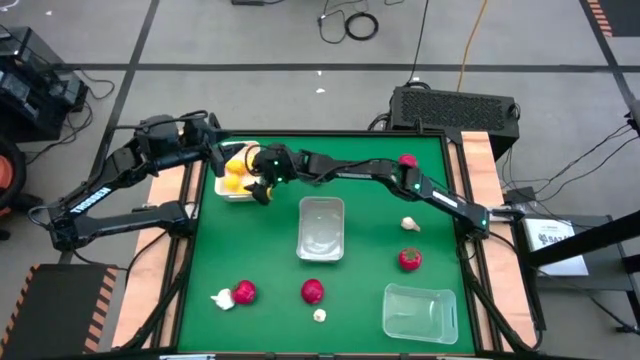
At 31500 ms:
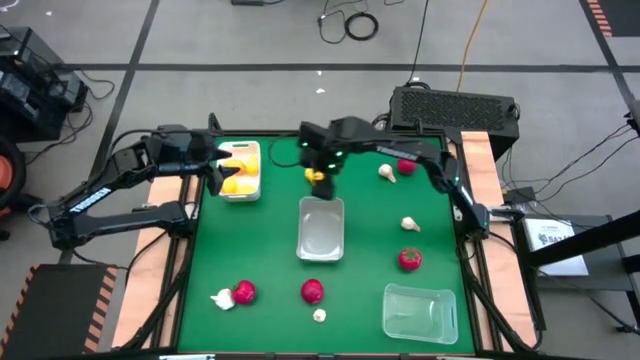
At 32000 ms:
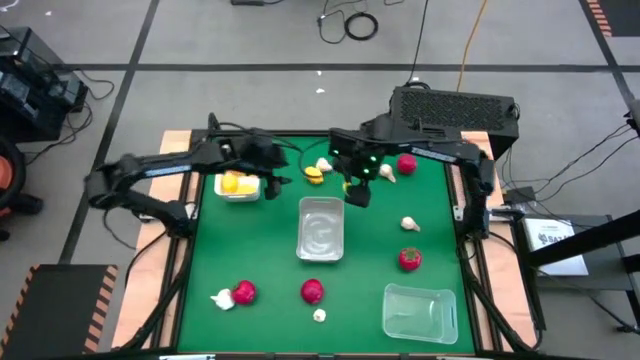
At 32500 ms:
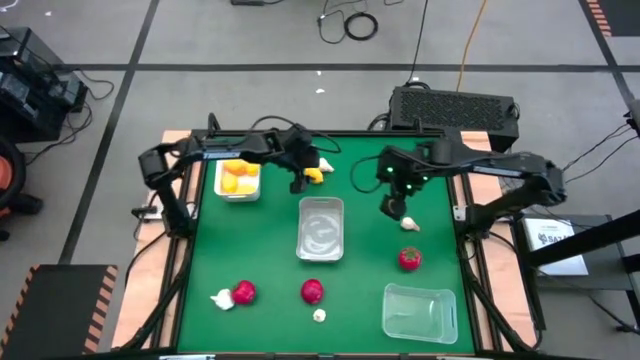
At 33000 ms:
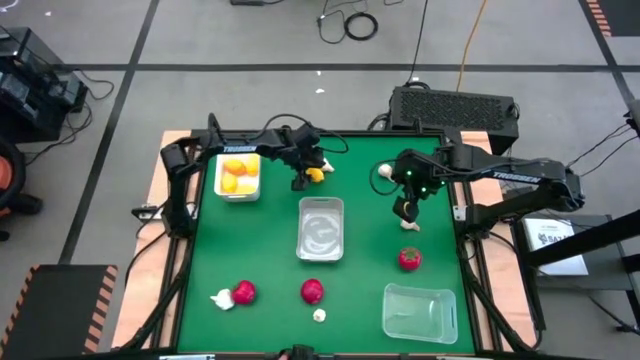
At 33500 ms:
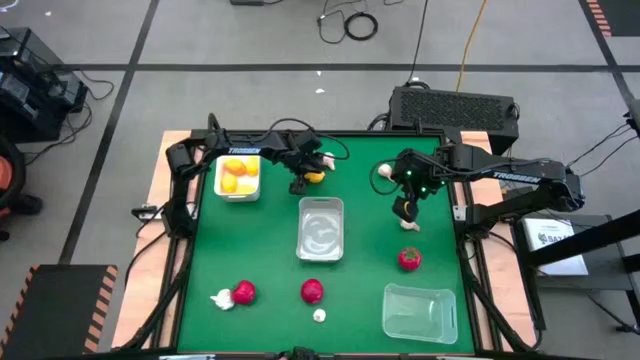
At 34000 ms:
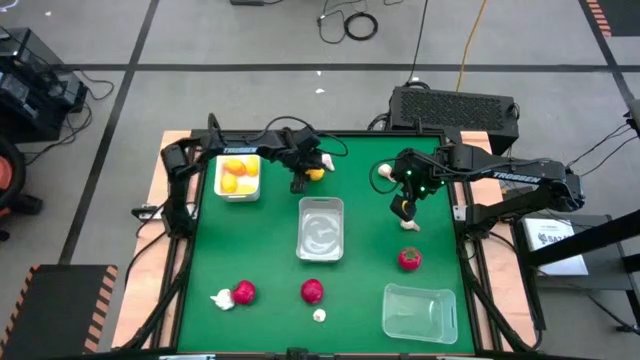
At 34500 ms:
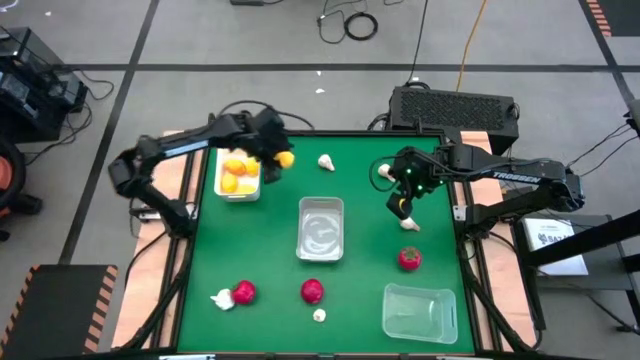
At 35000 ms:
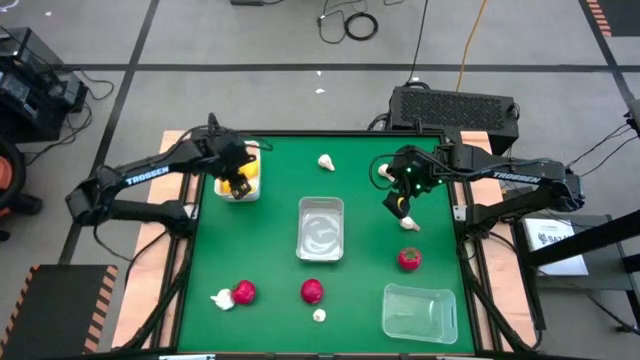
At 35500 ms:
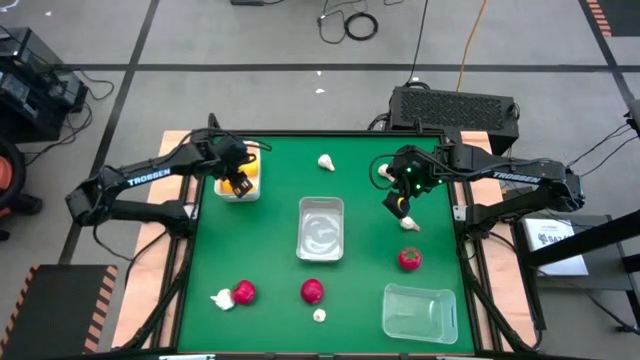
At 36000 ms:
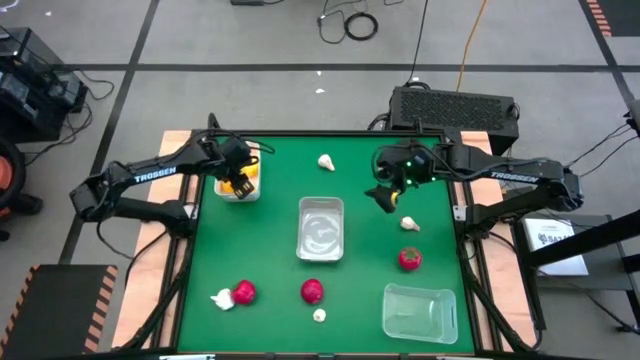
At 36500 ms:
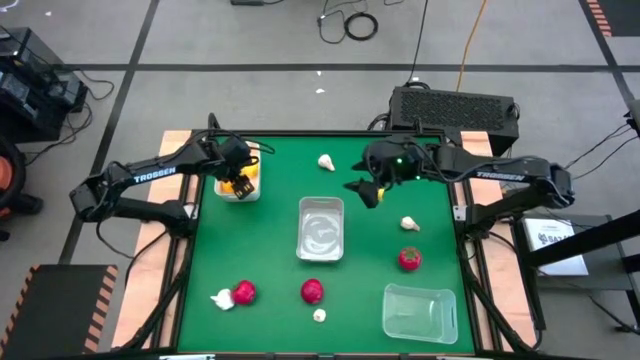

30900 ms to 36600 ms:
Task: Sort produce into baskets
Put the lemon into the white bin

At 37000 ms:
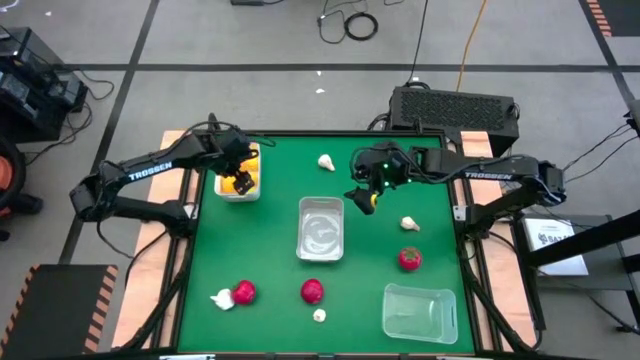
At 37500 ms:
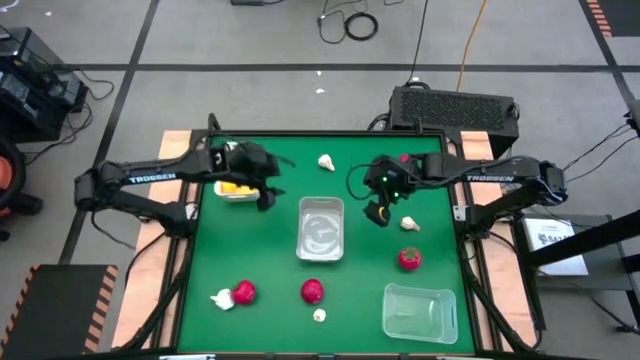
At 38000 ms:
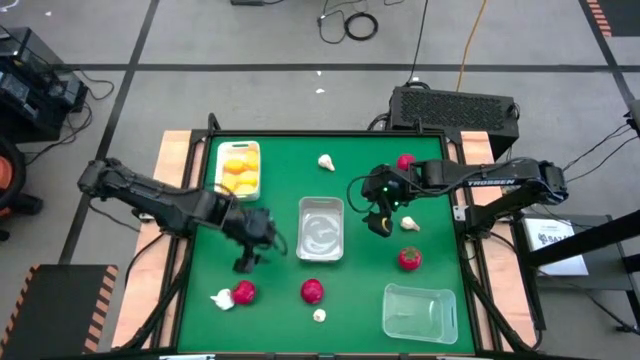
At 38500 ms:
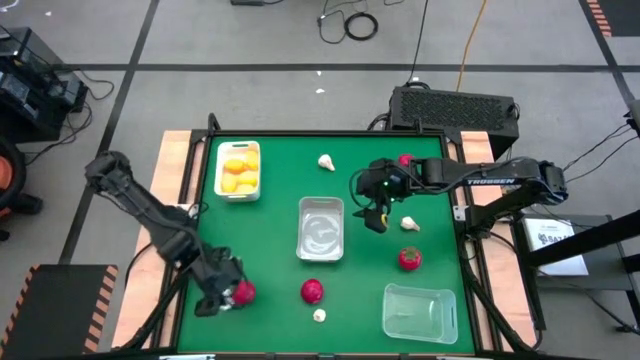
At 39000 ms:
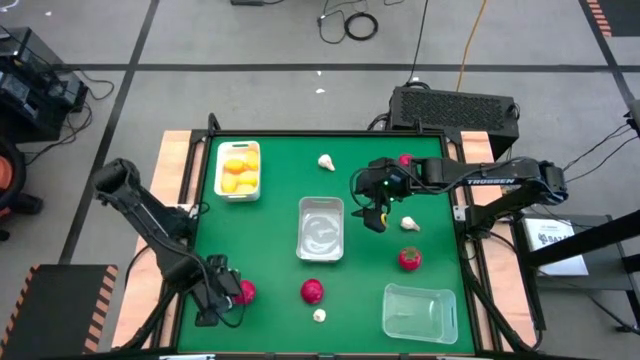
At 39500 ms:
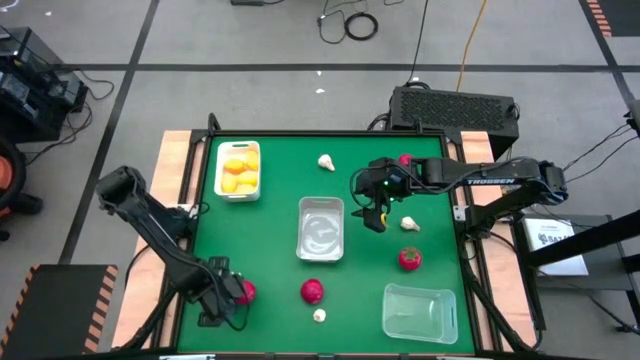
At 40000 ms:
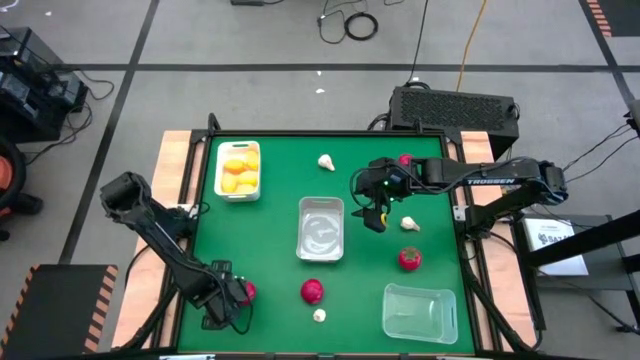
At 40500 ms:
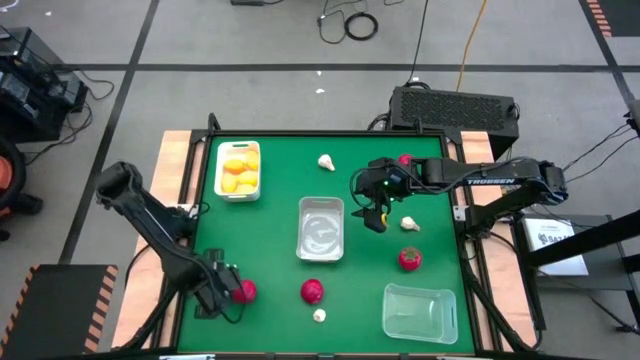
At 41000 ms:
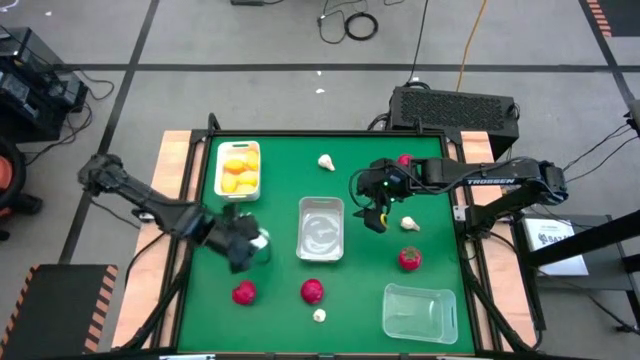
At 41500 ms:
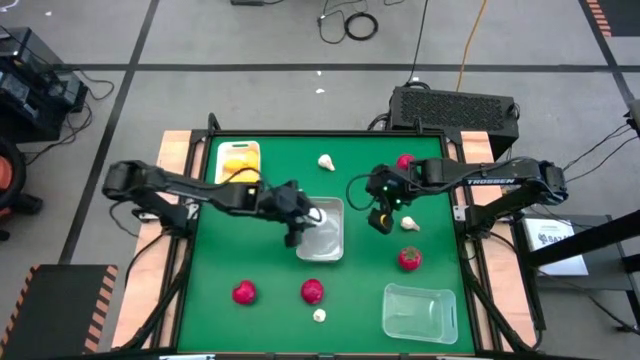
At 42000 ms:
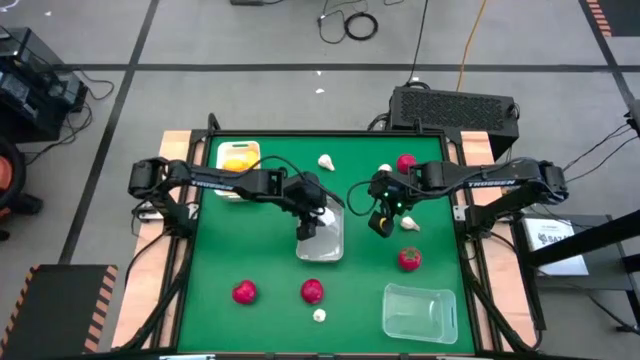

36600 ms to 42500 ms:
Put the garlic into the gray bin

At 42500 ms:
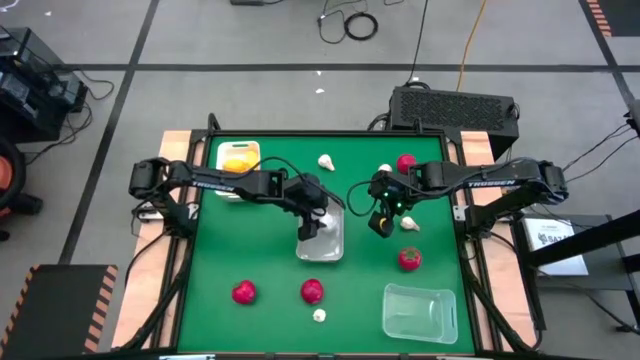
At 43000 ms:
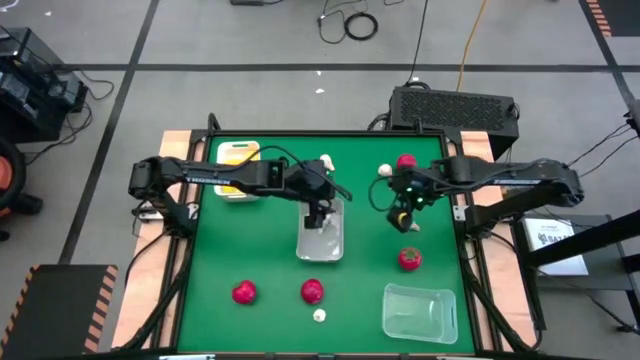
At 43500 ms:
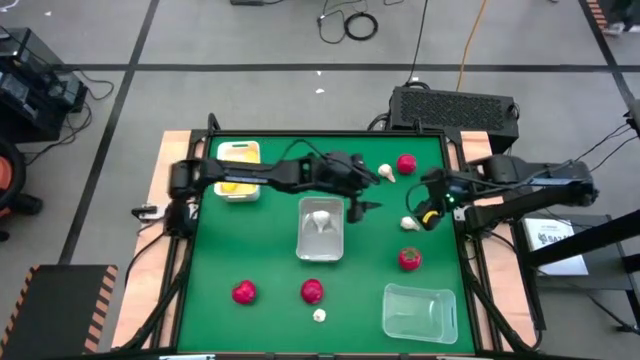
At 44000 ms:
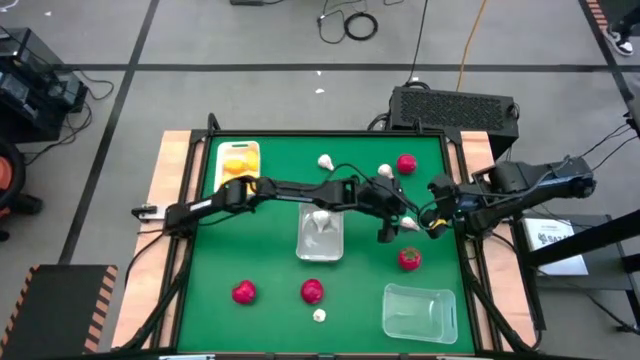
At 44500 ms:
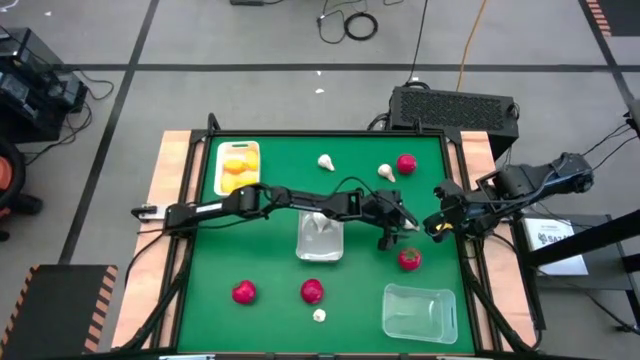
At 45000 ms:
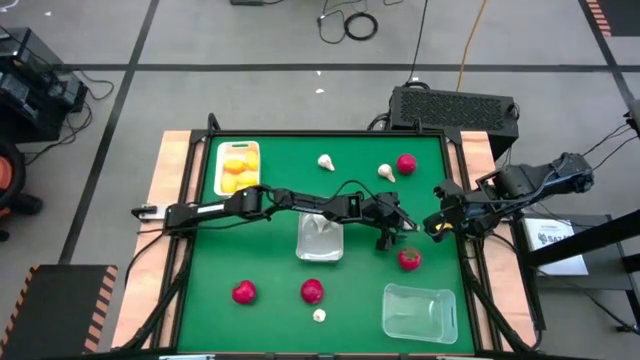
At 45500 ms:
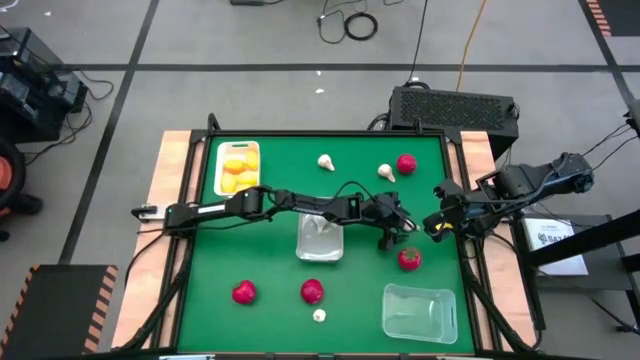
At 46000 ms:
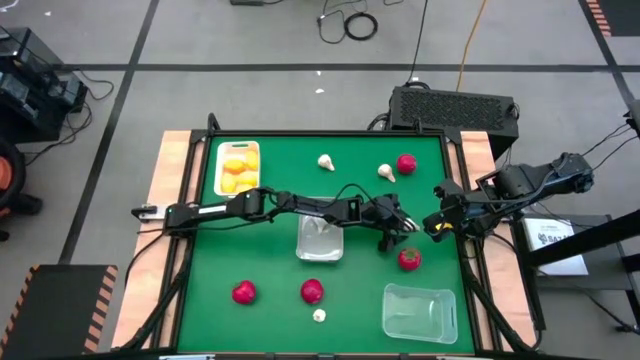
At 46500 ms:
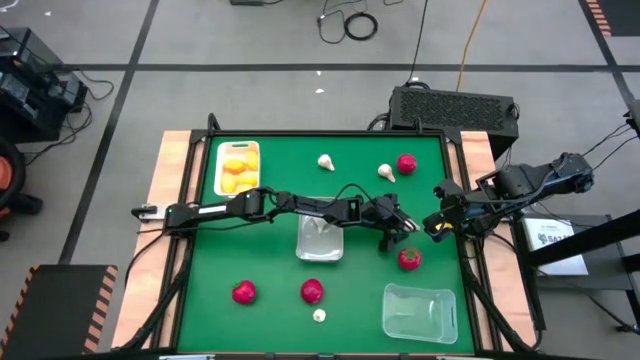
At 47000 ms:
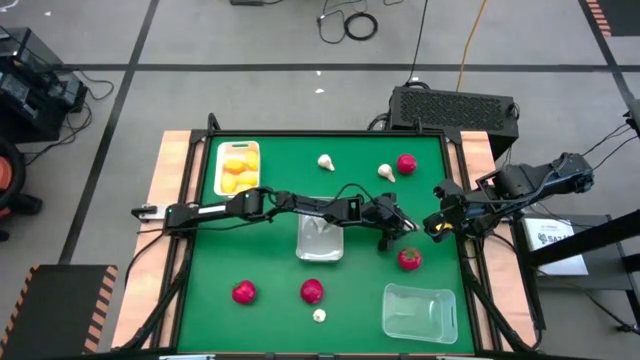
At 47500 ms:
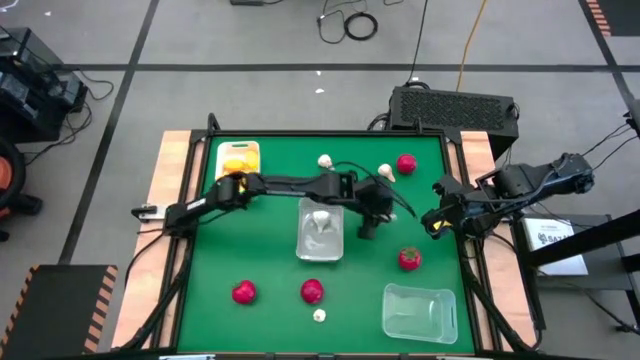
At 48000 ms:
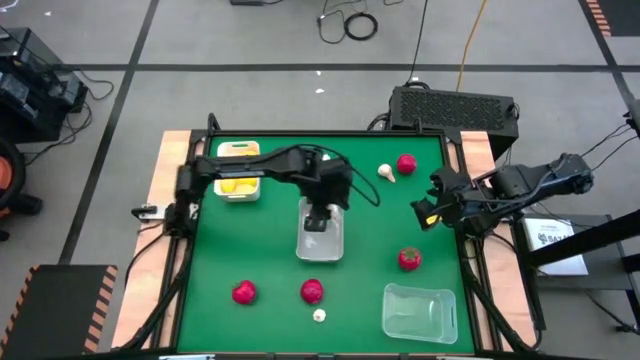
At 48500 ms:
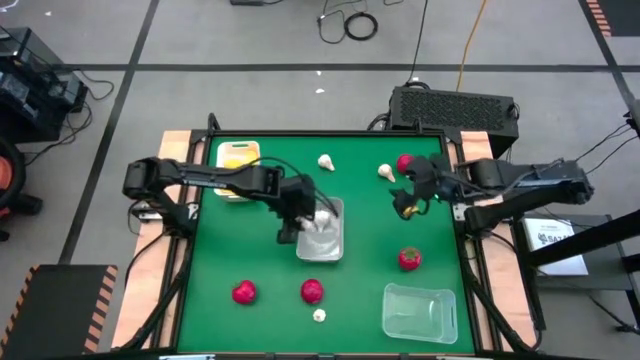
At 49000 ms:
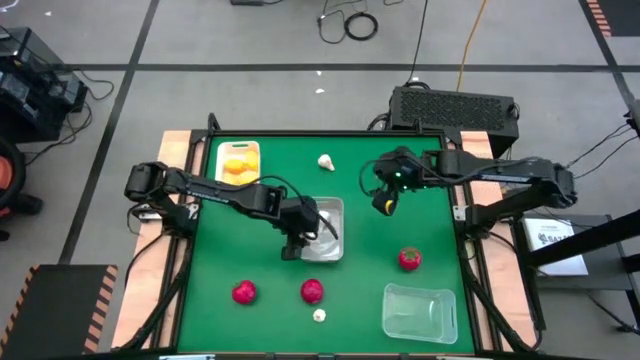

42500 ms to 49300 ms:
Put the garlic into the gray bin

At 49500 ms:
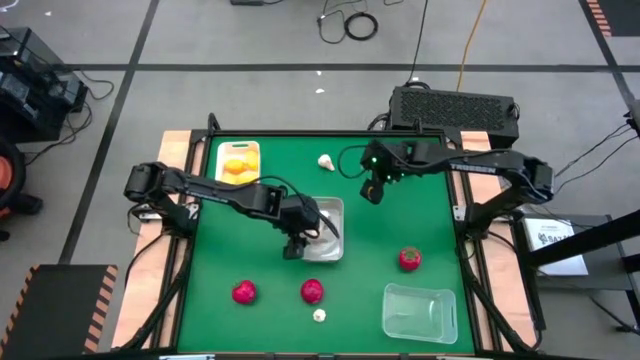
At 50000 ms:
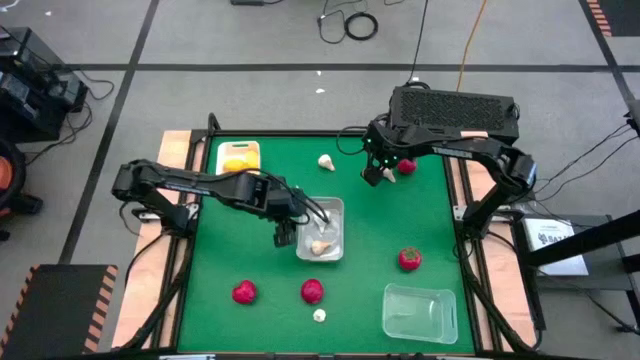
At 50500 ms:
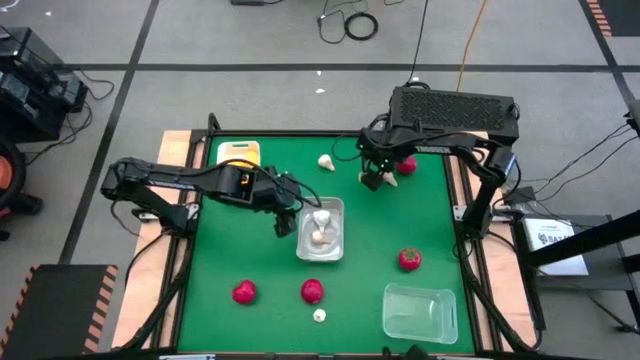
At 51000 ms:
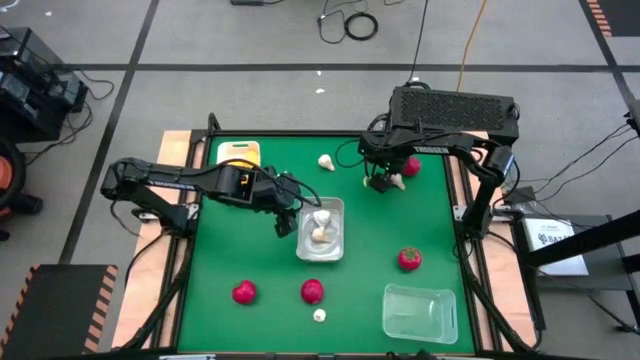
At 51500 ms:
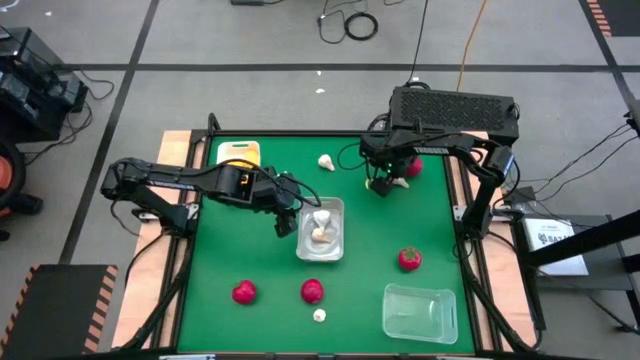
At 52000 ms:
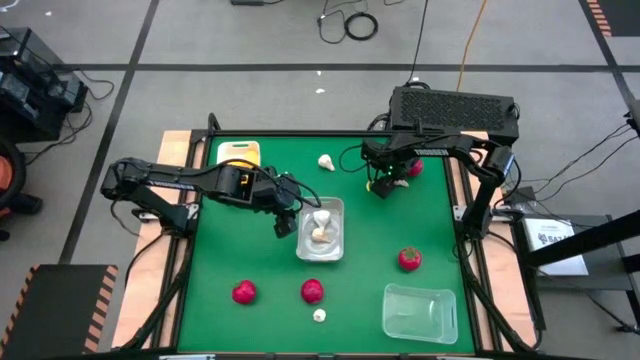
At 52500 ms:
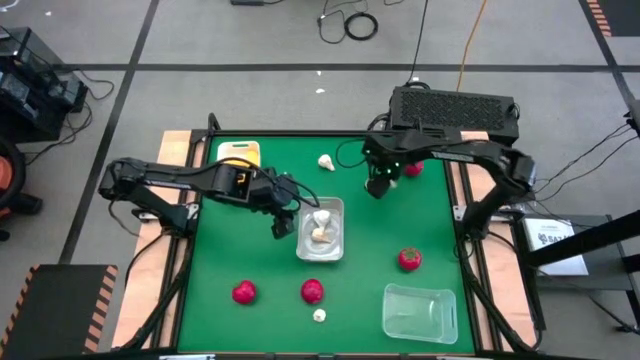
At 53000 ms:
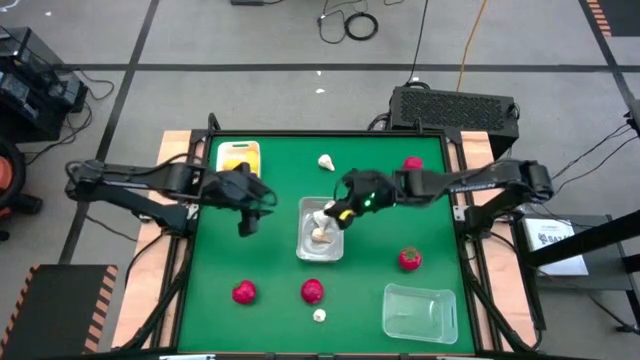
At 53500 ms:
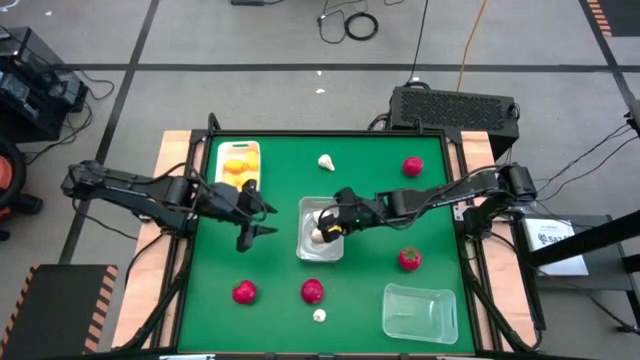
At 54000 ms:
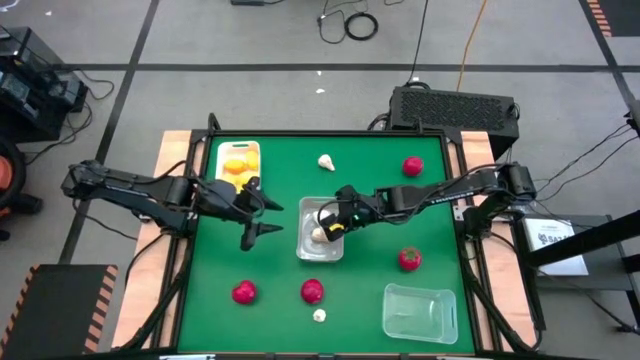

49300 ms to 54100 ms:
Put the garlic into the gray bin
